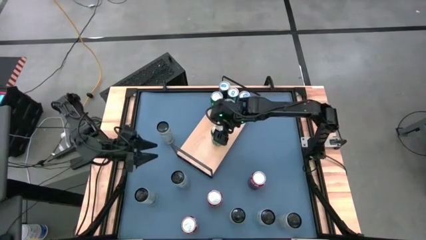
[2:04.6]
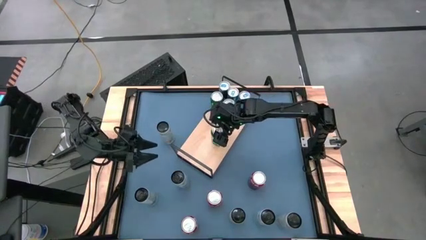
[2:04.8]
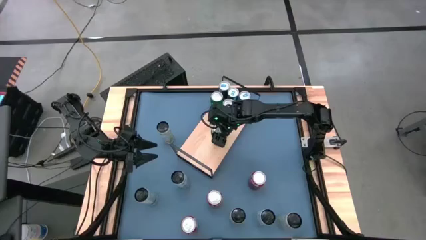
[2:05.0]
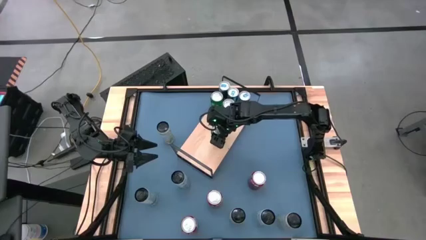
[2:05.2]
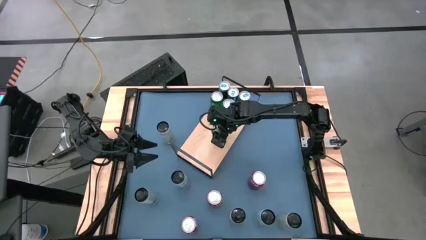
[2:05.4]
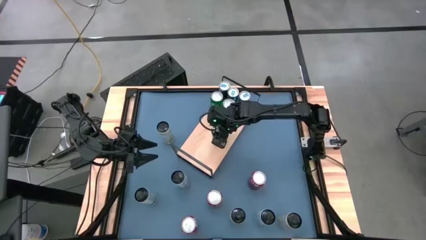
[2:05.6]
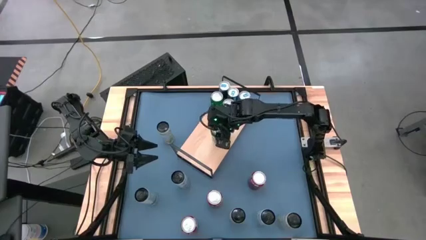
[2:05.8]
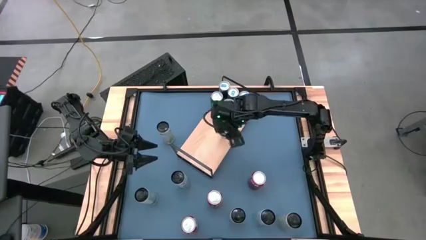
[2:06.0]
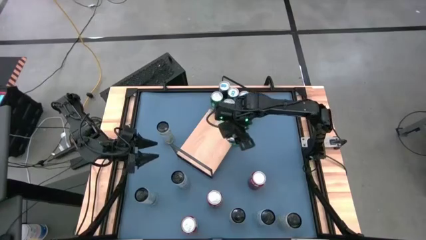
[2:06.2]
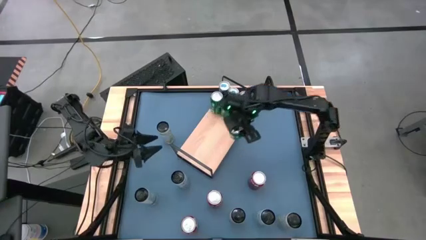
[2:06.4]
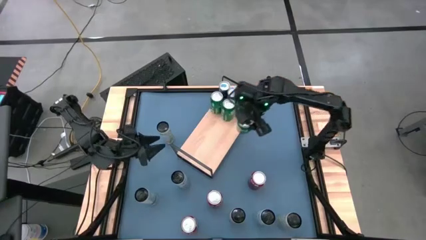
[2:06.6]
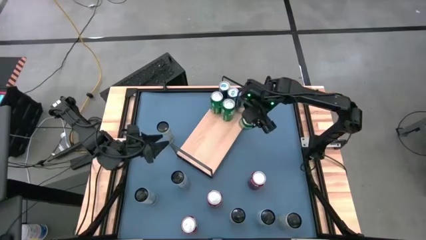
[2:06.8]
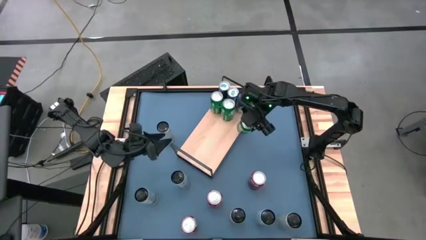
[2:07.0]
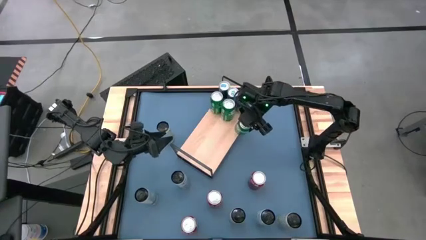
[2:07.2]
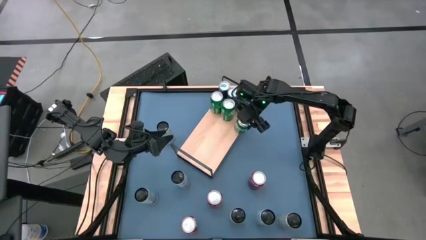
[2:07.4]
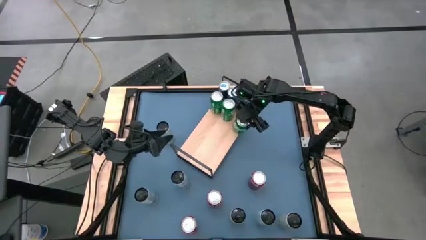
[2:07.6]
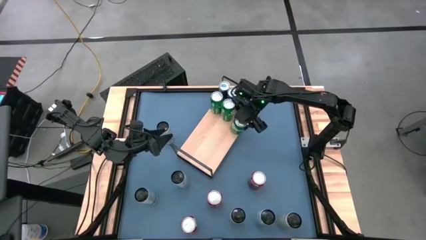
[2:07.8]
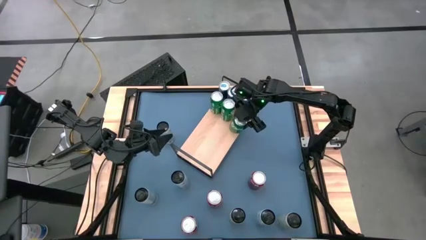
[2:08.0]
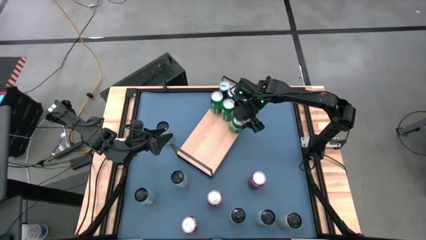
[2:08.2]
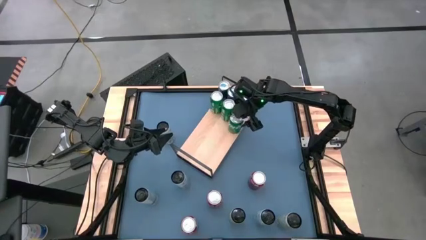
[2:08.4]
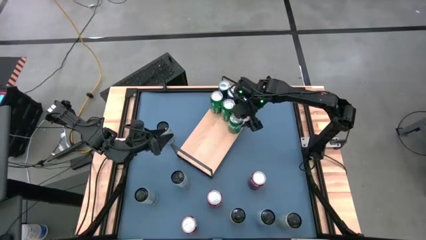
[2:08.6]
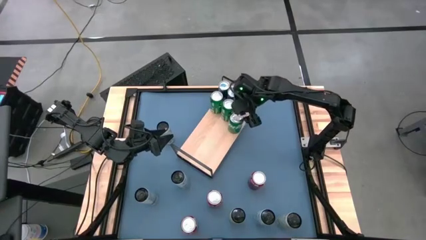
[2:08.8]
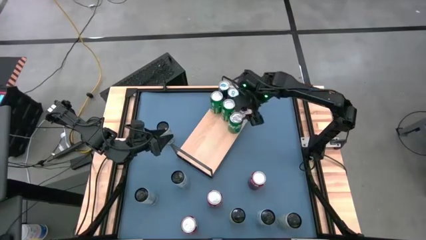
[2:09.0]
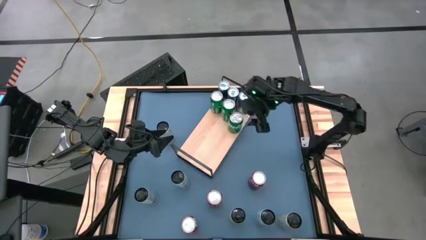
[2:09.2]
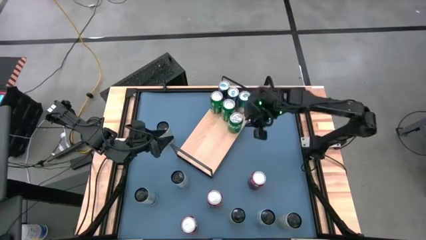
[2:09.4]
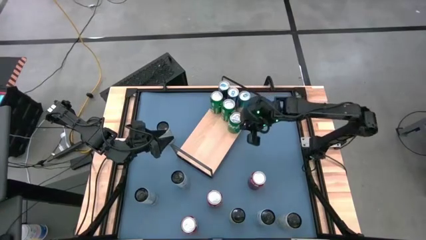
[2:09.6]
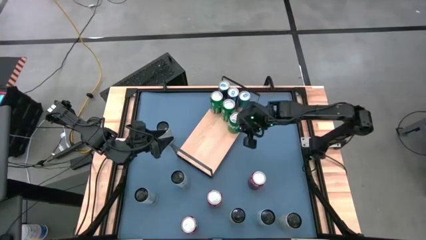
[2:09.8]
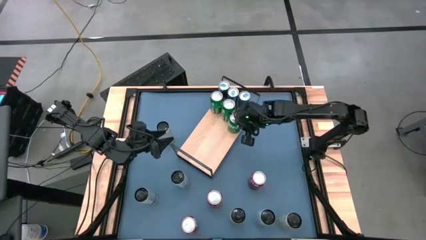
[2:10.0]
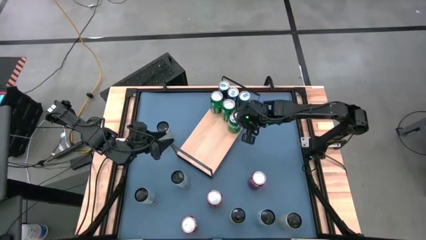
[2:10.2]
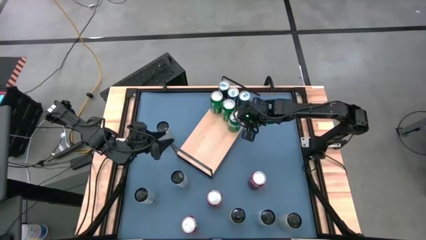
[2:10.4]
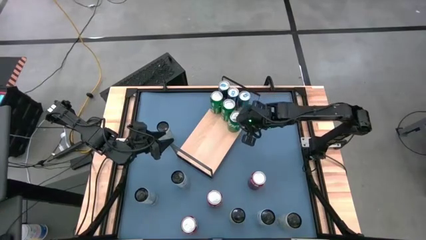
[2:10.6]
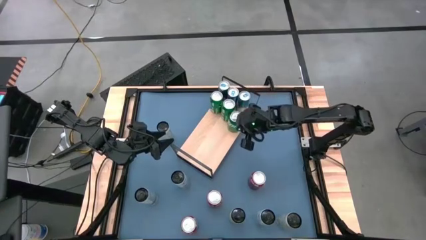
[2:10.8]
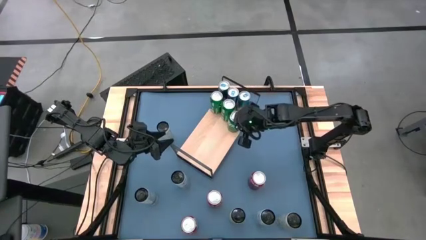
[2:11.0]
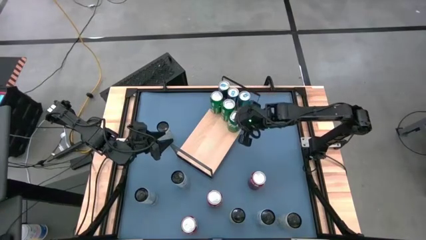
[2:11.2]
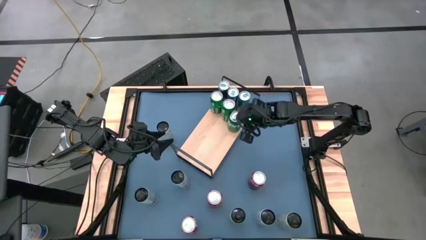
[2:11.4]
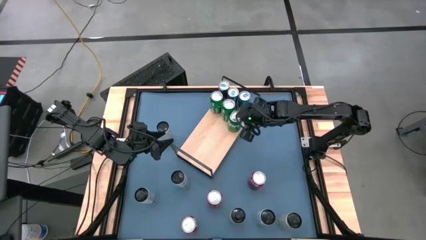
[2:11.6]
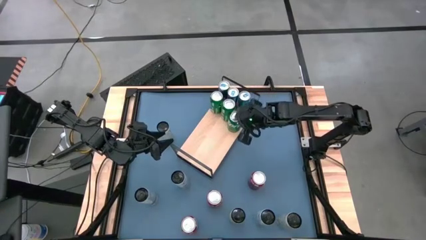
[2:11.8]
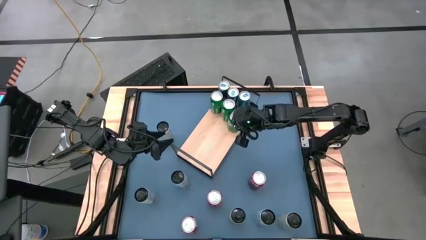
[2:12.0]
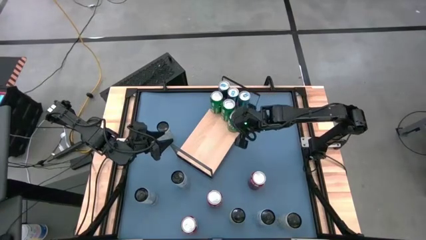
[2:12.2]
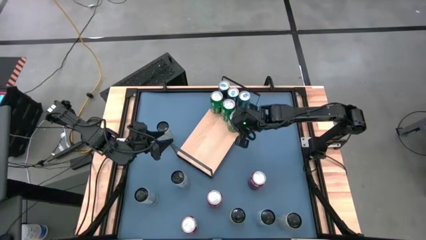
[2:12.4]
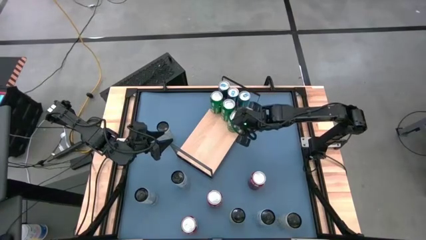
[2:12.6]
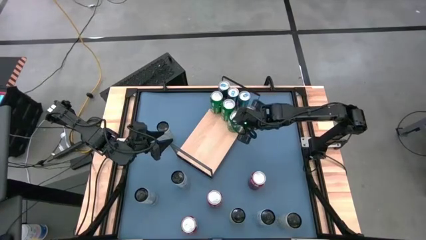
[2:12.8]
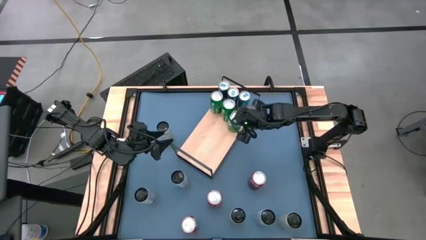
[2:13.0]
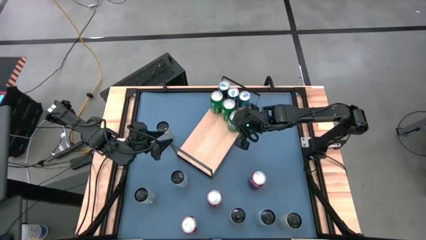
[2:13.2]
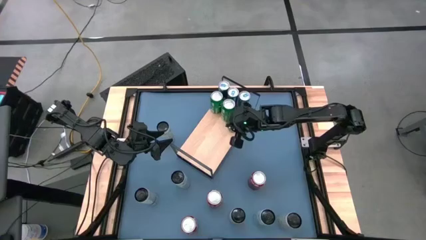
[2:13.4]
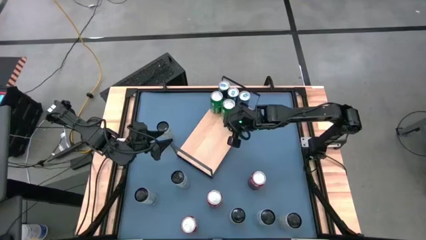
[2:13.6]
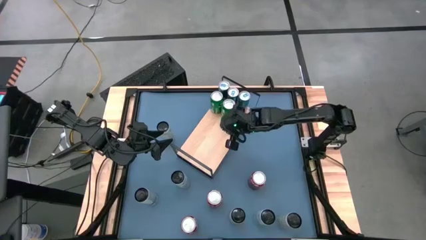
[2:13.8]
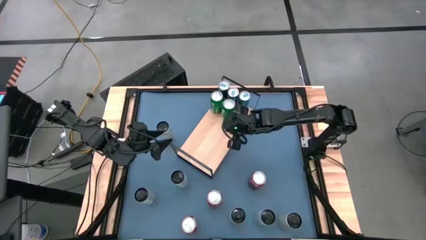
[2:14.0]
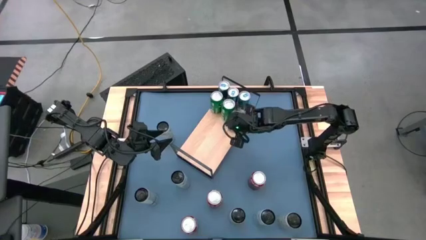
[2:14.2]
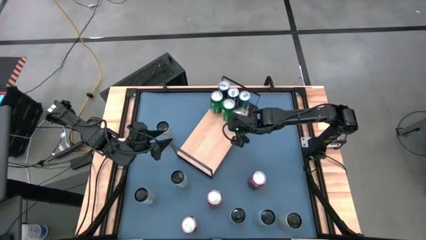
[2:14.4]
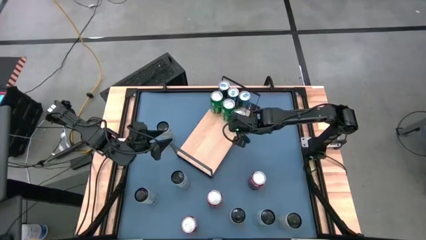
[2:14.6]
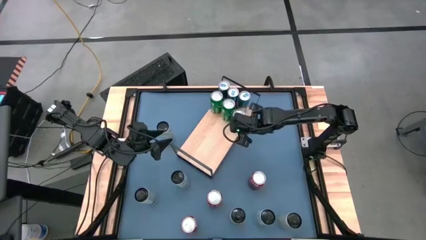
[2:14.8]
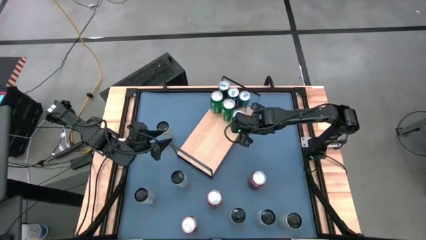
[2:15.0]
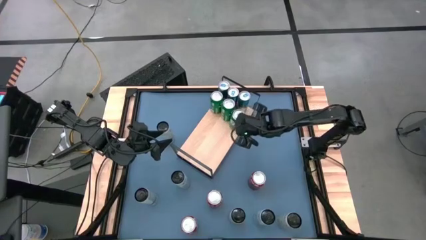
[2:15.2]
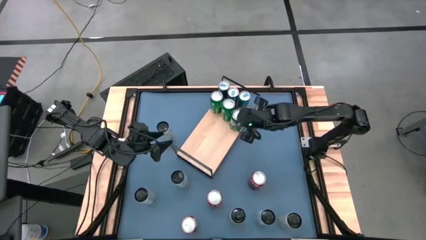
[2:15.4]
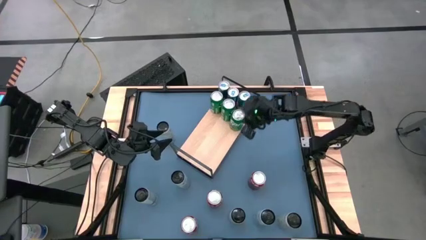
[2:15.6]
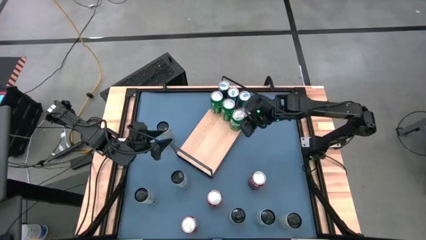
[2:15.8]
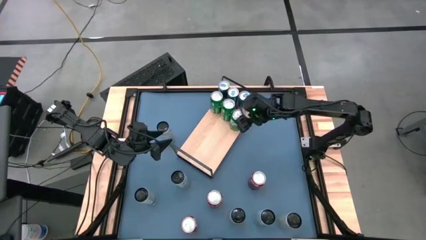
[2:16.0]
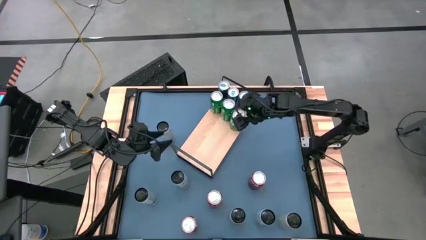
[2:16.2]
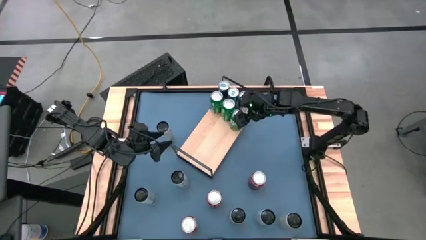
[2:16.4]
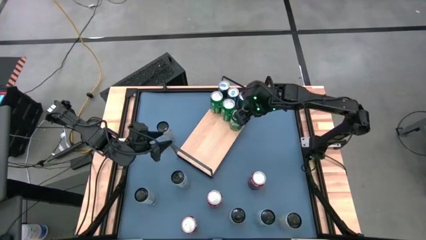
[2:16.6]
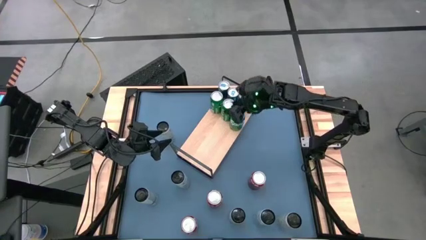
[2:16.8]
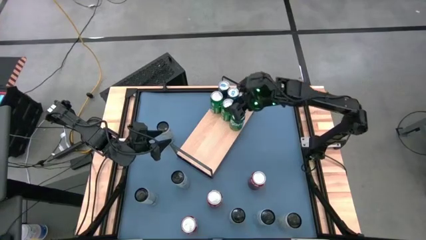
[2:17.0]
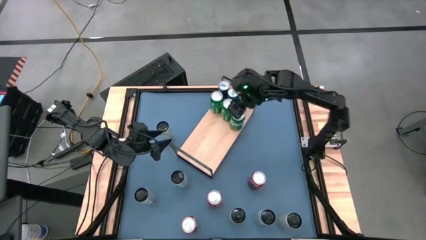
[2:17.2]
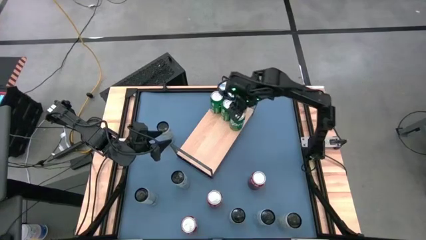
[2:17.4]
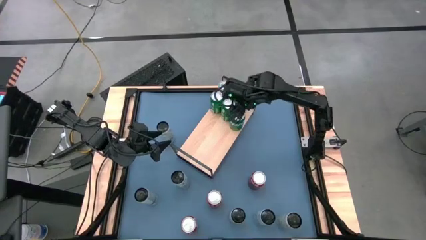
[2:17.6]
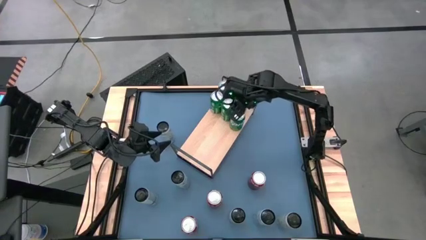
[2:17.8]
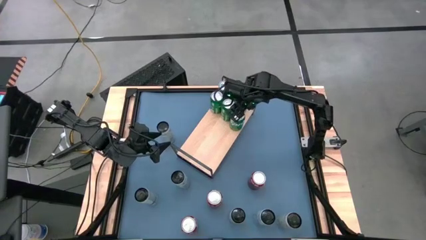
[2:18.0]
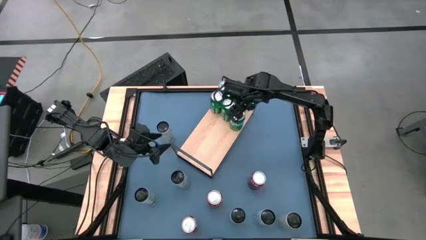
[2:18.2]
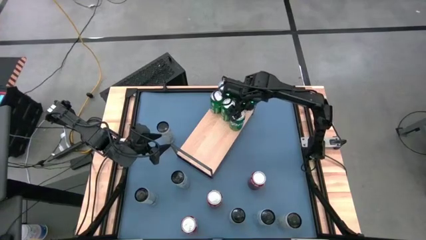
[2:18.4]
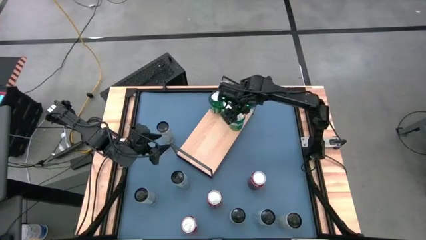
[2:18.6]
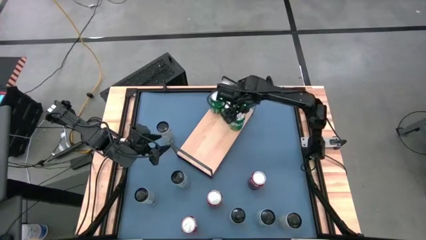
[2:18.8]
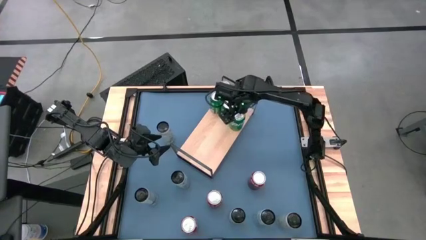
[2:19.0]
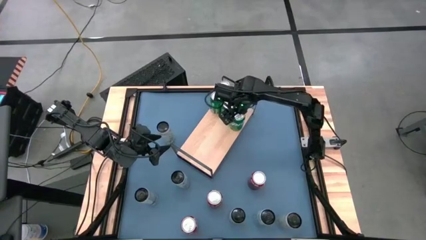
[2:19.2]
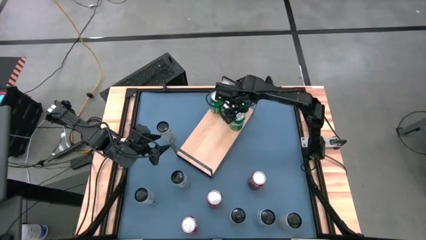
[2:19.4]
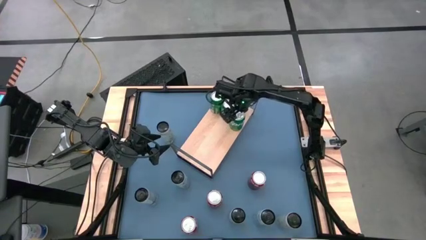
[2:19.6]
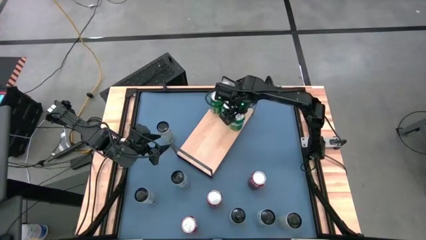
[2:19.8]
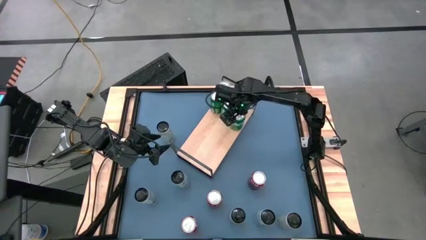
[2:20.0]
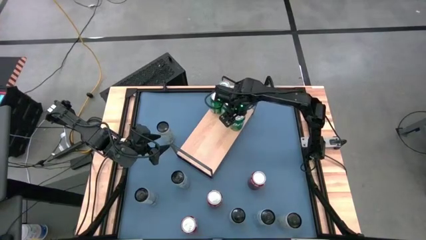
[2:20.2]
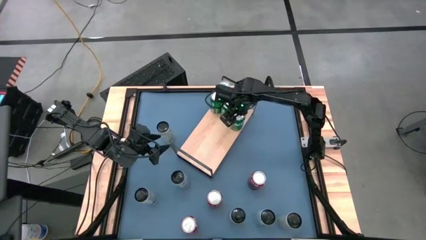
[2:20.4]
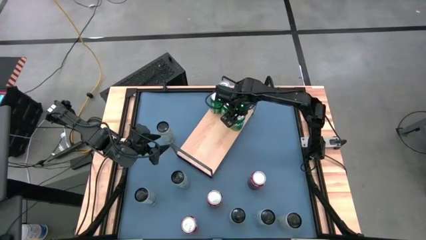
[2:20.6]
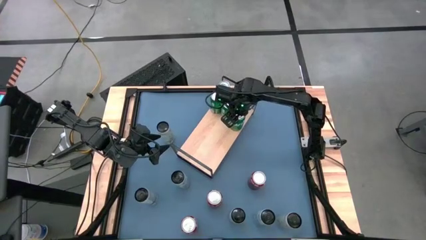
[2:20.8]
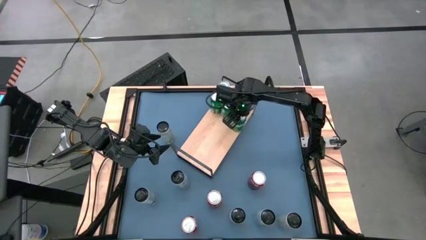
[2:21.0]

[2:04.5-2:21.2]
Task: Place canned beverage on shelf
Put green soda can on the shelf aligned with the other green soda cans
